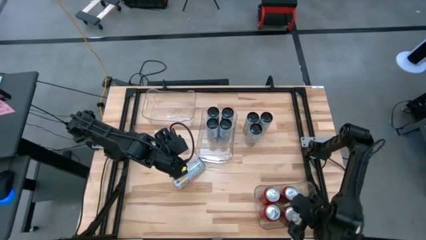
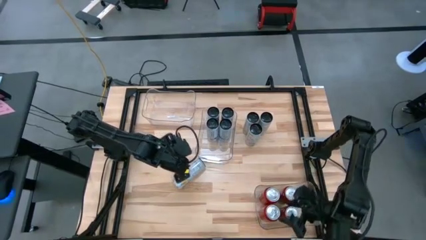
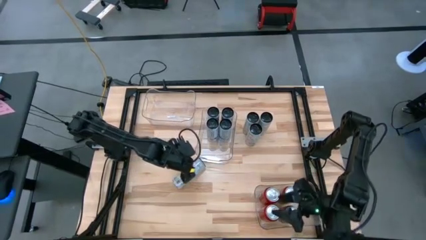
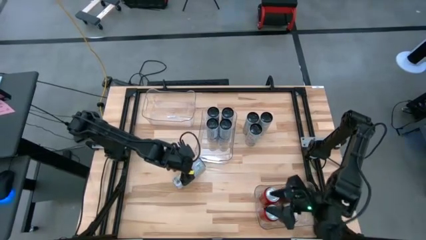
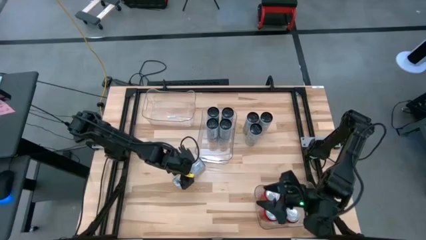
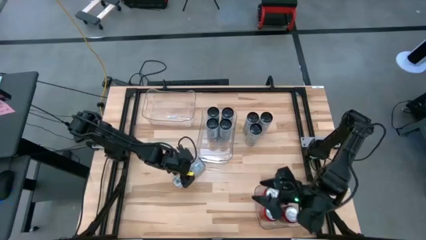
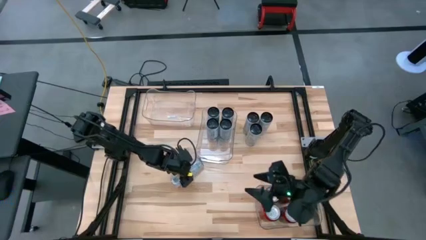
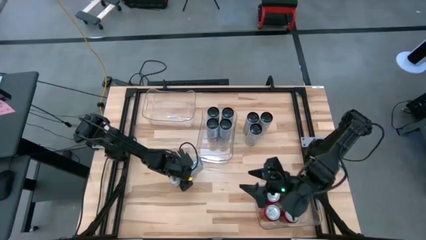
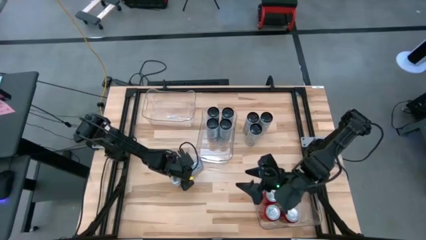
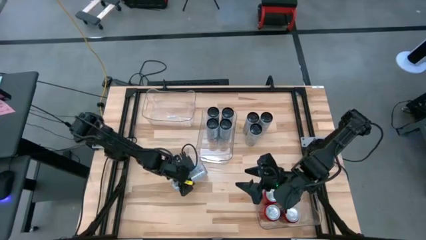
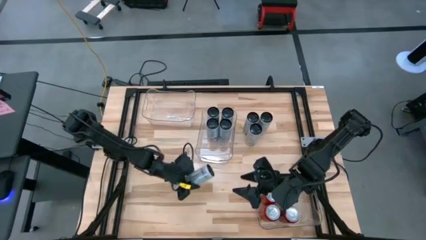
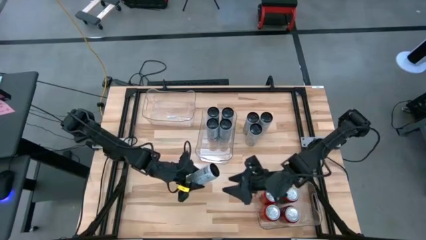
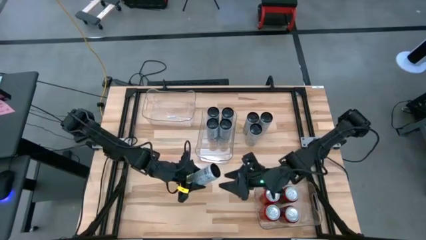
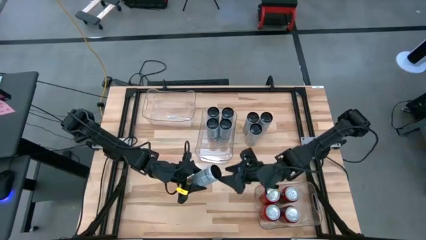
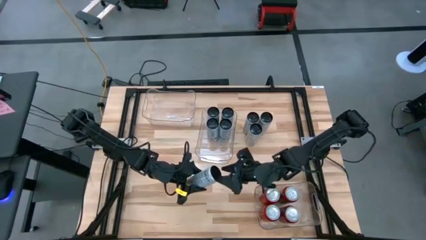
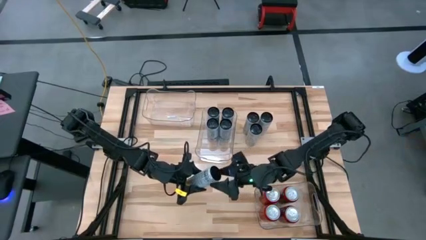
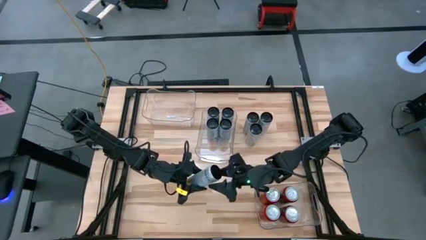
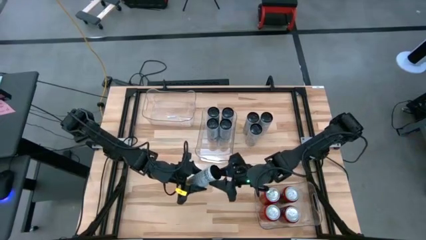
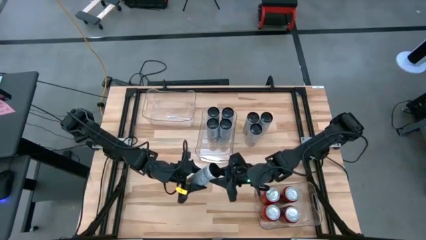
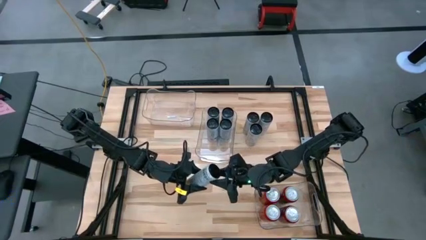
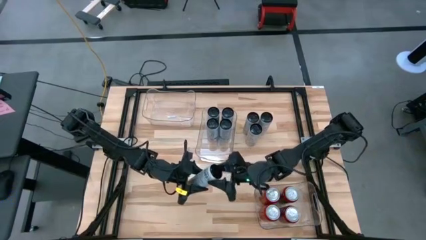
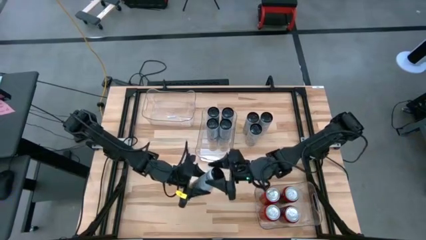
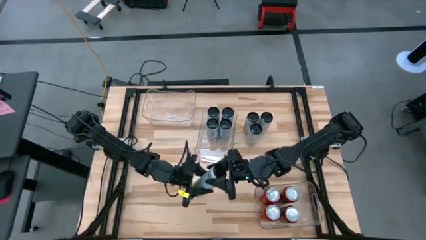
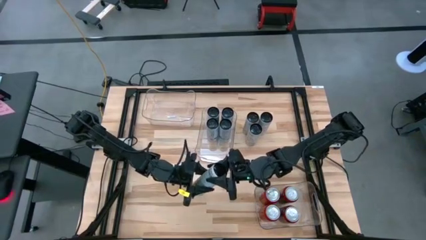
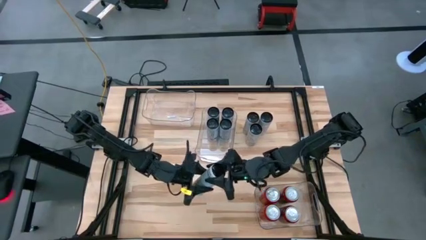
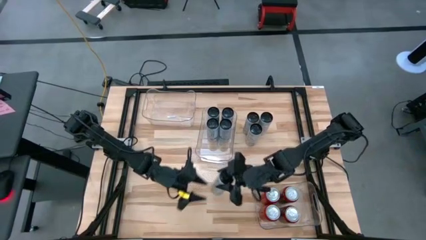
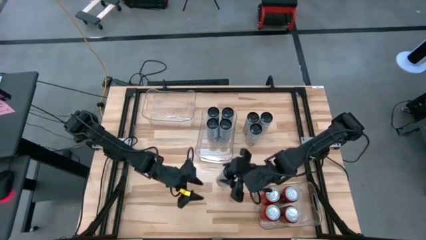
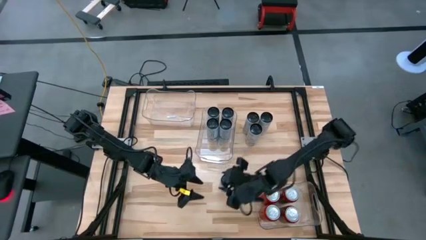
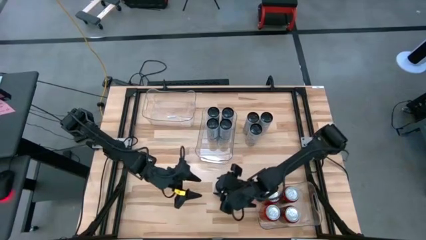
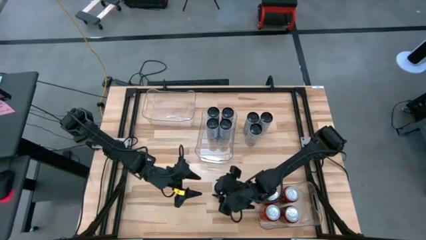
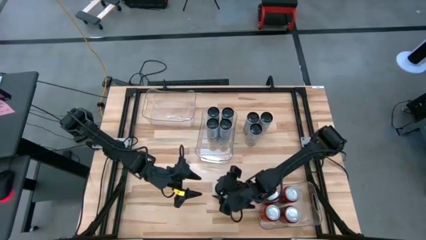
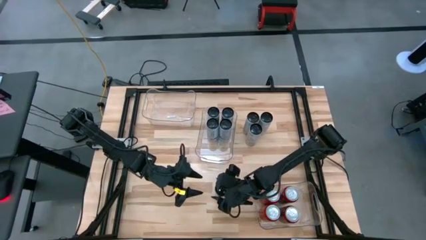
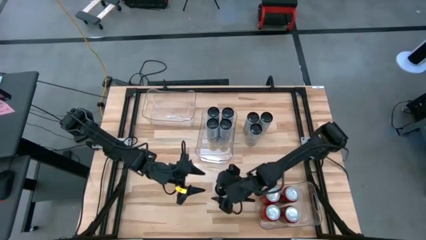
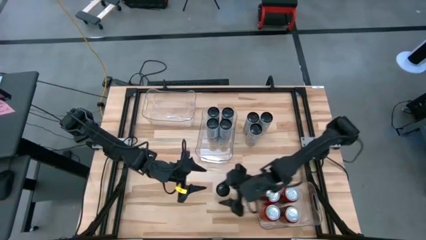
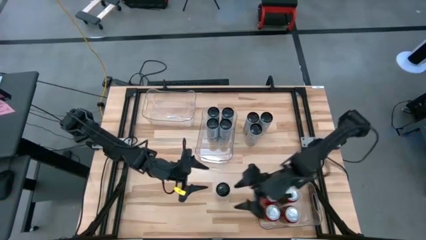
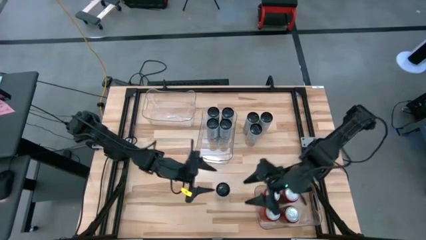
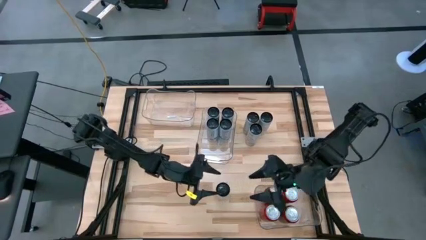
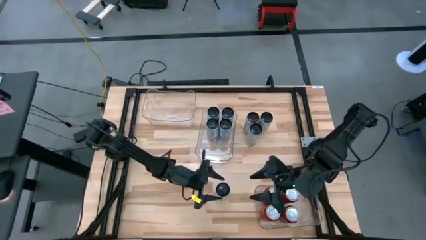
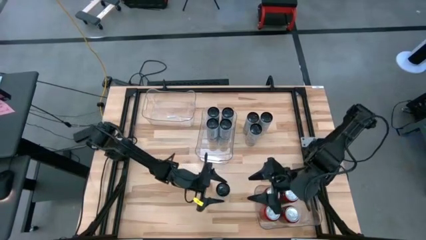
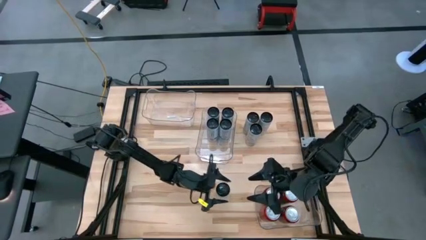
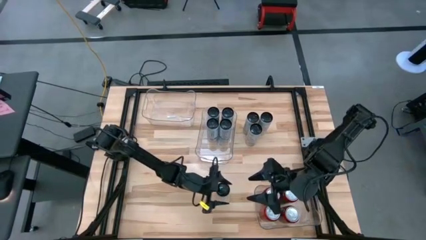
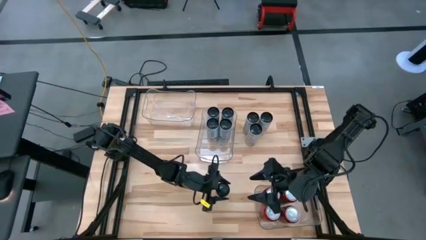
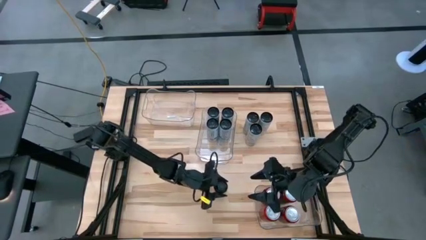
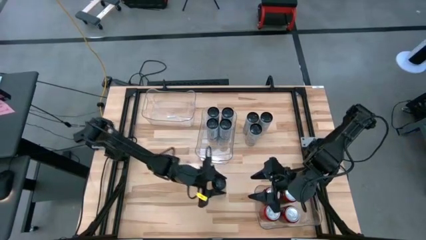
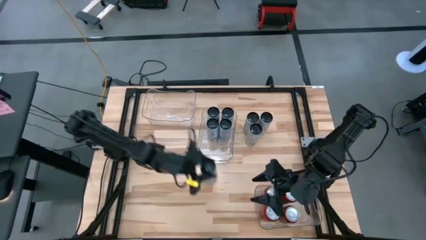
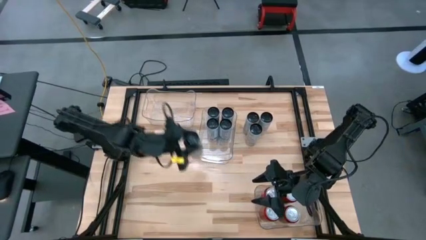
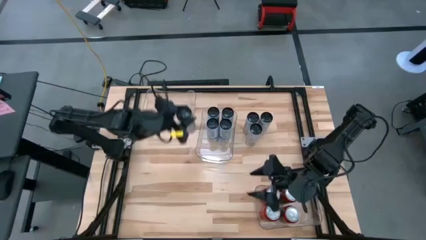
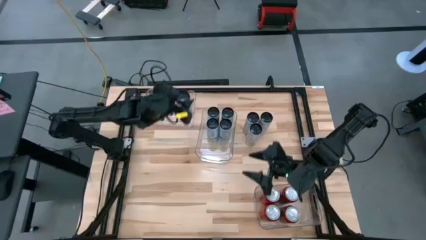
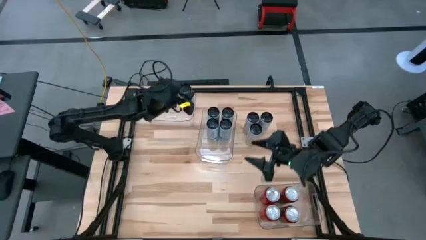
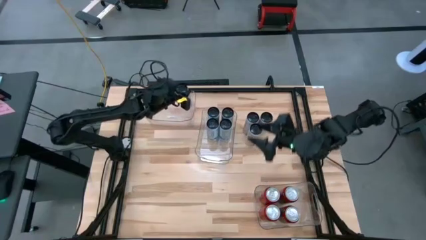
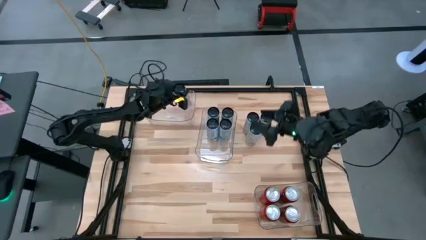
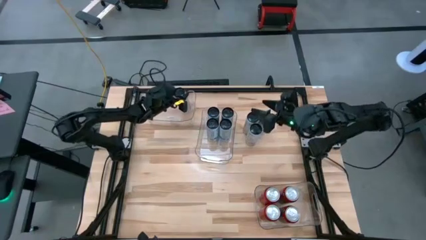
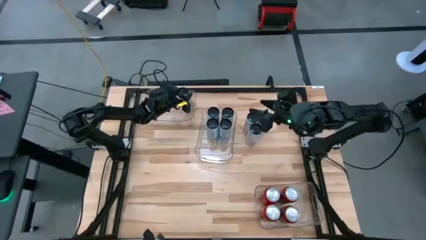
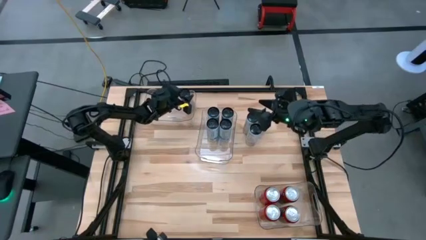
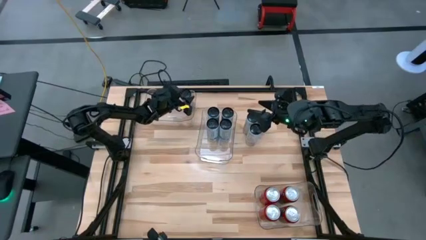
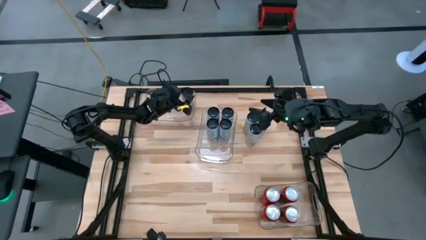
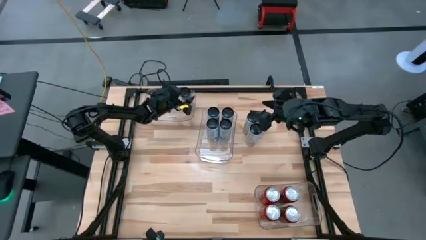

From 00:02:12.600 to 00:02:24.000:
Task: Sort soda cans
Put the white yellow soda can into the top transparent bin

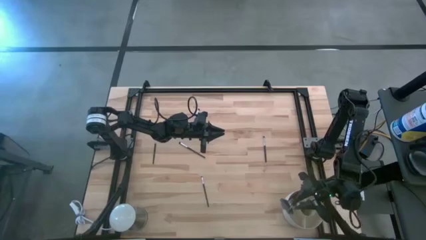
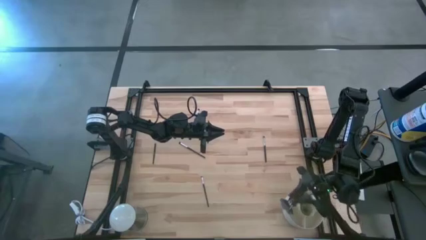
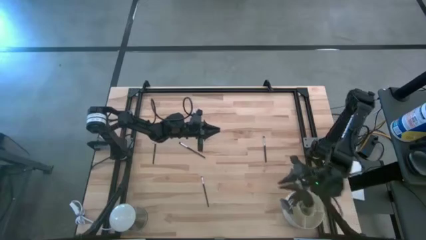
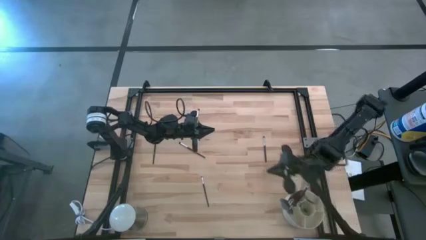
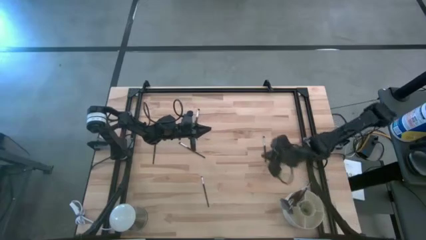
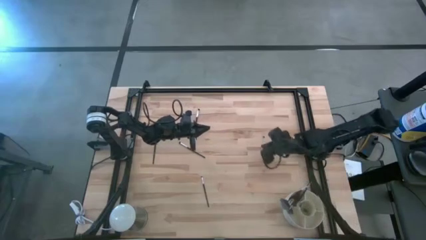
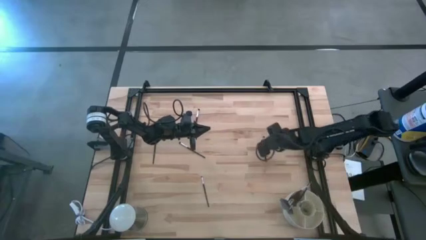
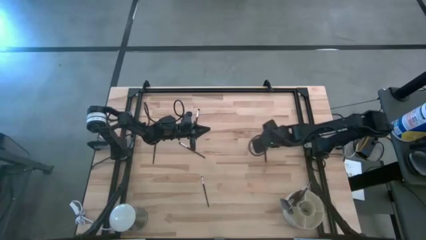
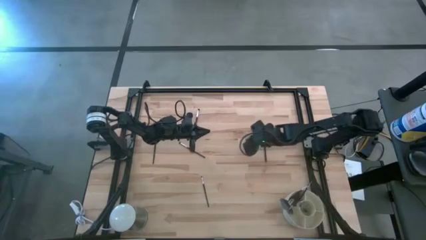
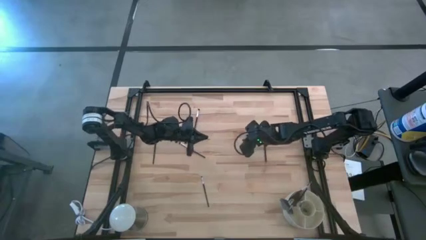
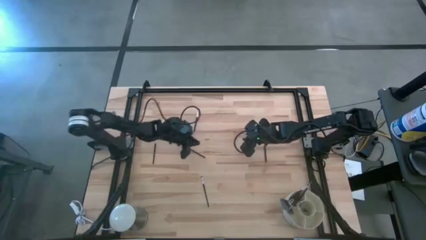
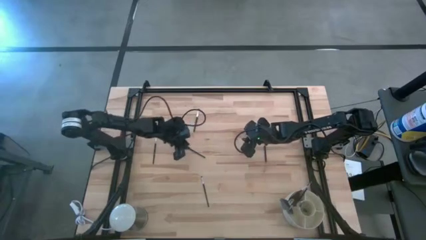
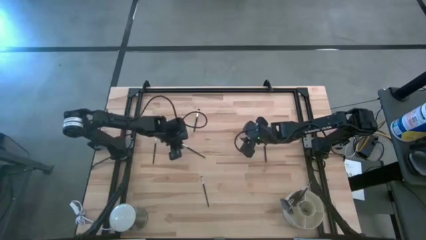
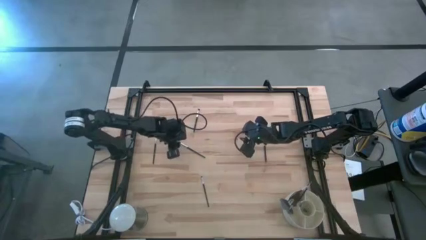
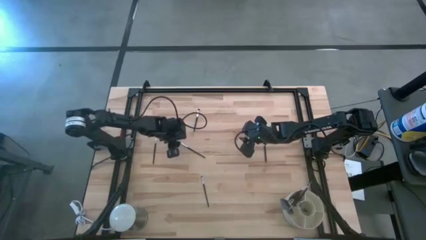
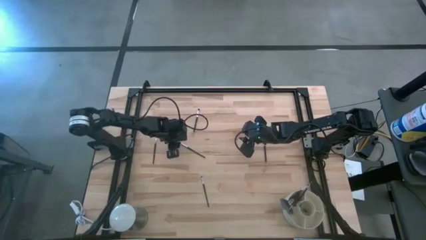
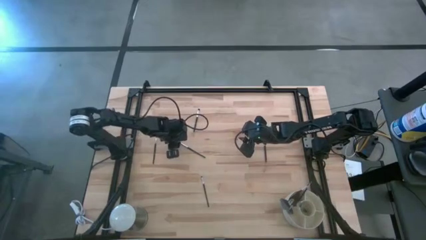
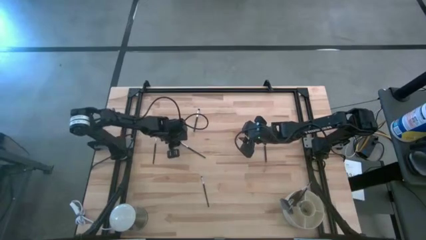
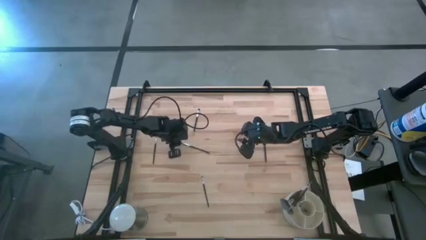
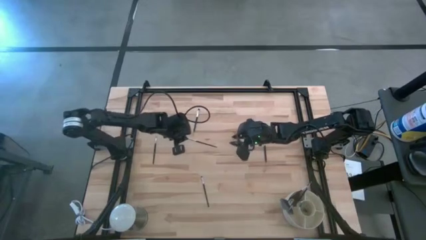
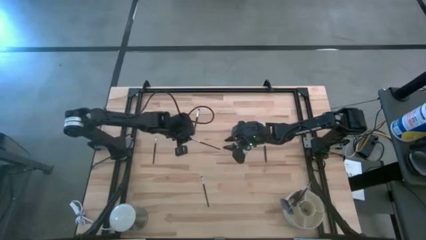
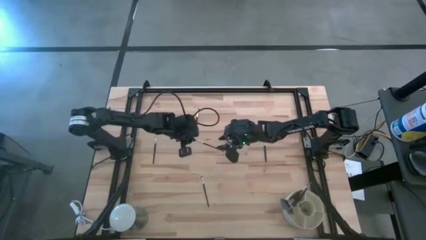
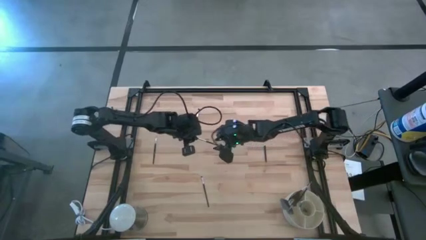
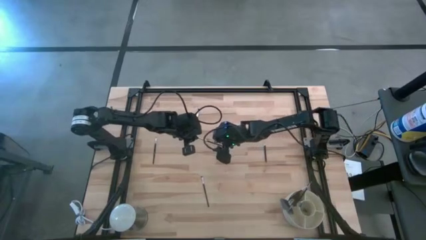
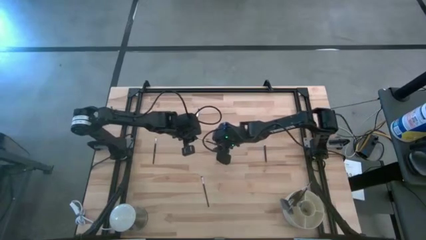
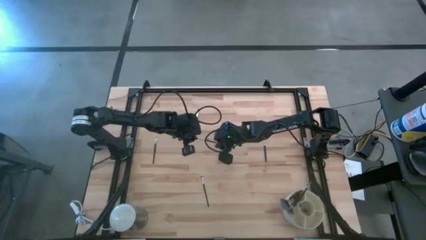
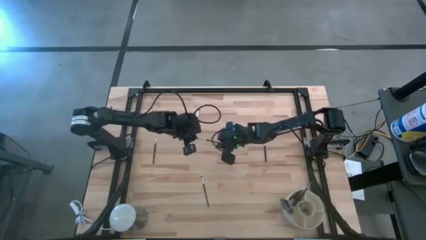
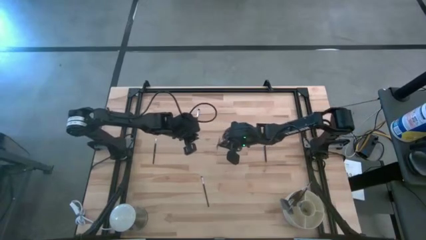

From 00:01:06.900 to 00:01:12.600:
Task: Put items in baskets/containers
Put the black eyeshadow brush into the white organizer
